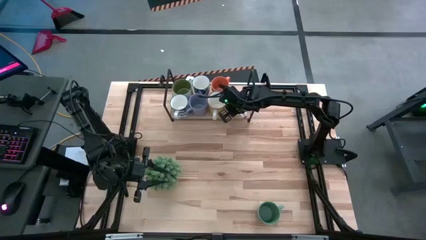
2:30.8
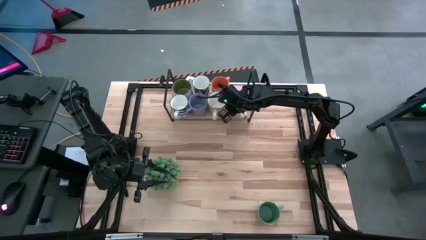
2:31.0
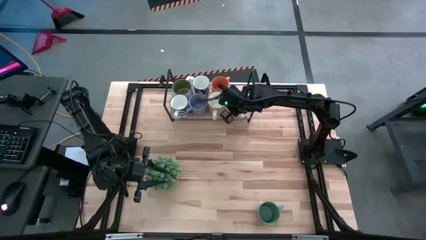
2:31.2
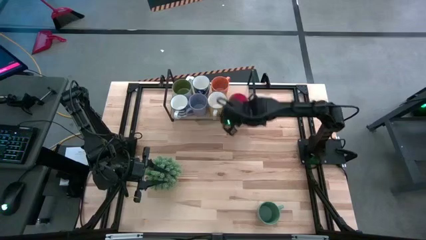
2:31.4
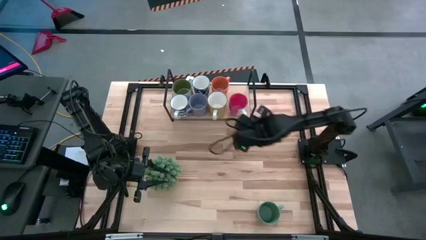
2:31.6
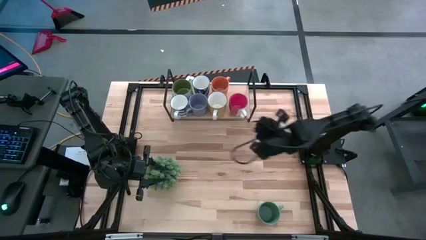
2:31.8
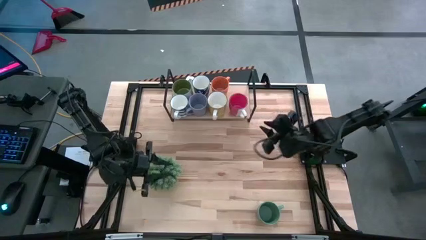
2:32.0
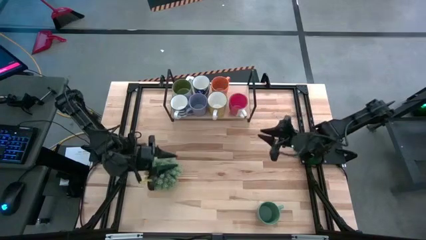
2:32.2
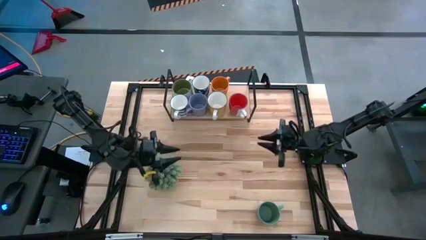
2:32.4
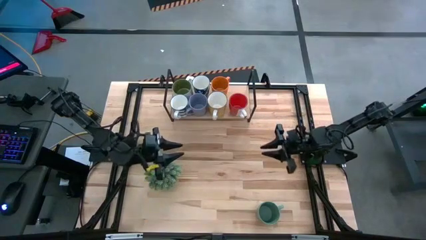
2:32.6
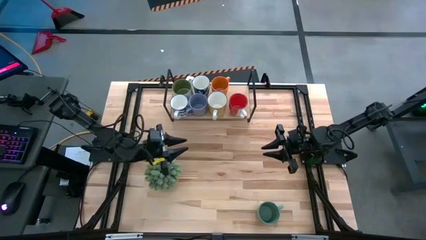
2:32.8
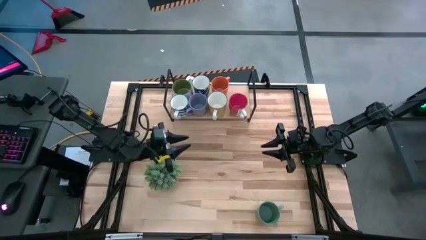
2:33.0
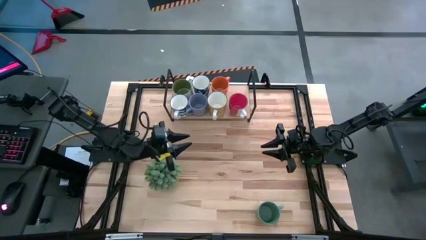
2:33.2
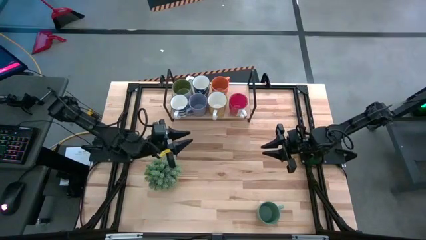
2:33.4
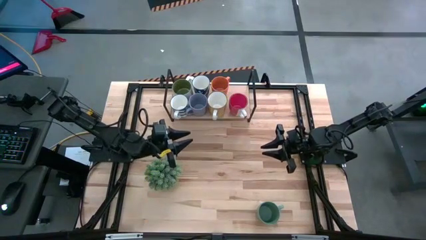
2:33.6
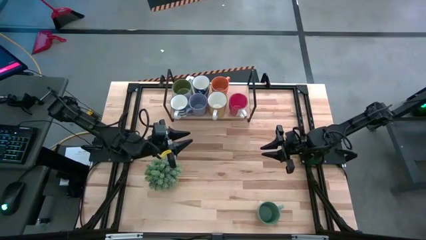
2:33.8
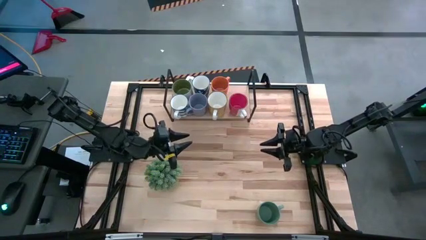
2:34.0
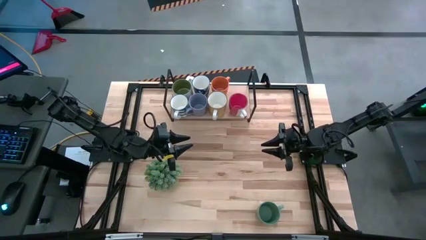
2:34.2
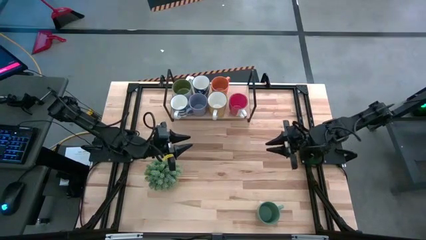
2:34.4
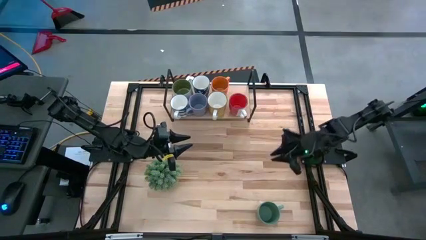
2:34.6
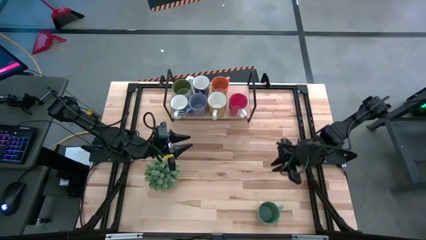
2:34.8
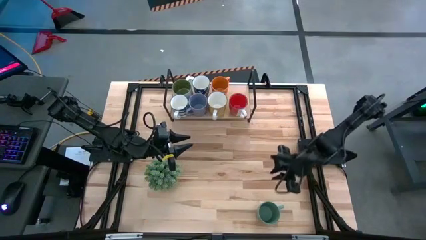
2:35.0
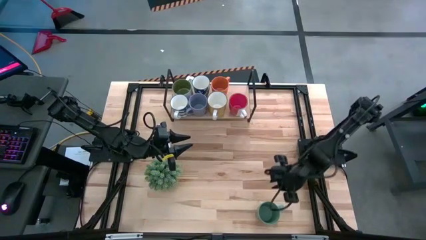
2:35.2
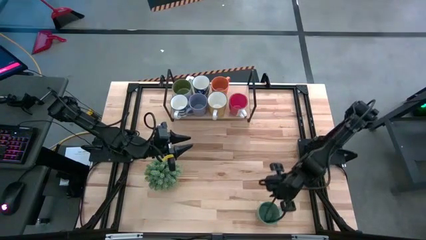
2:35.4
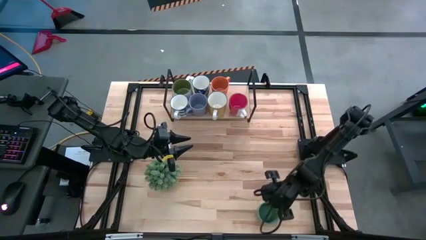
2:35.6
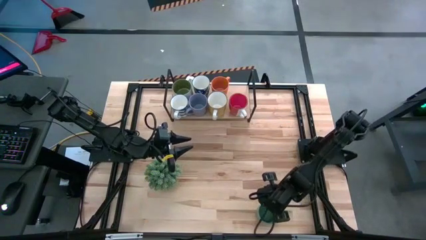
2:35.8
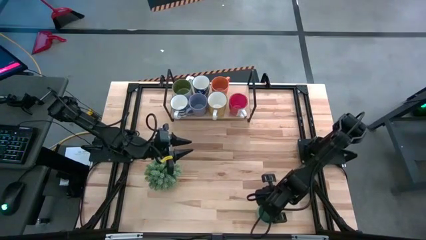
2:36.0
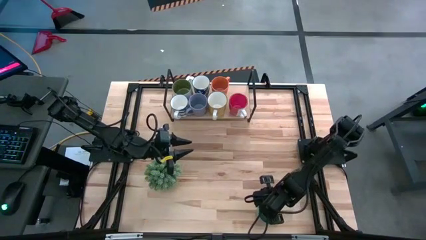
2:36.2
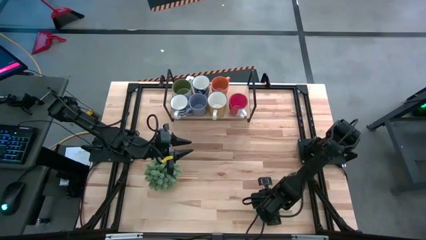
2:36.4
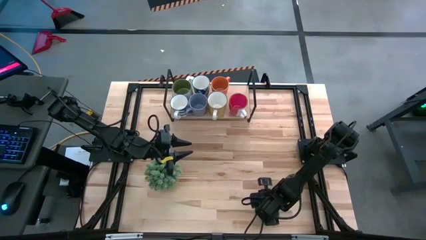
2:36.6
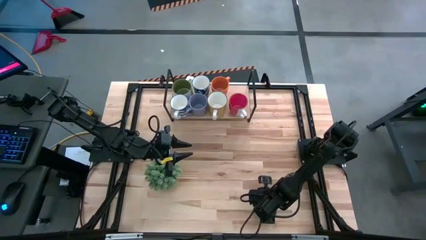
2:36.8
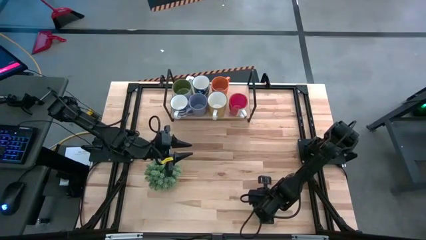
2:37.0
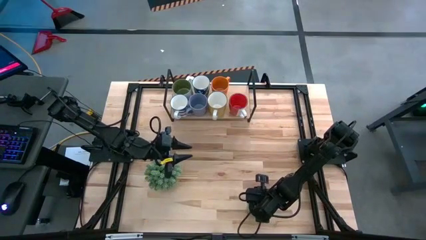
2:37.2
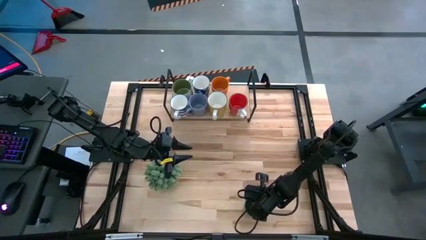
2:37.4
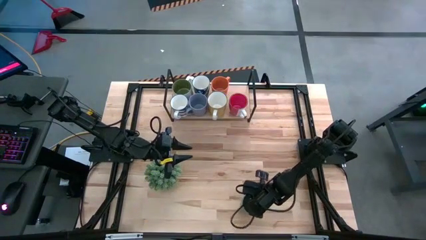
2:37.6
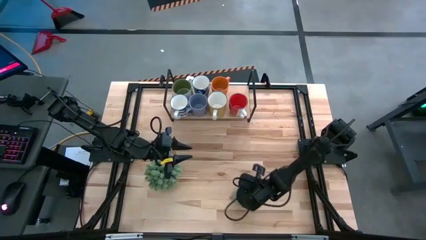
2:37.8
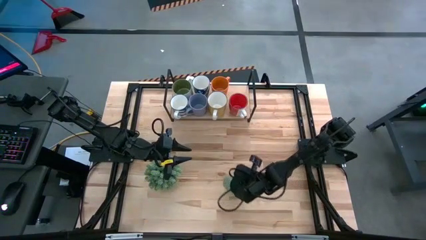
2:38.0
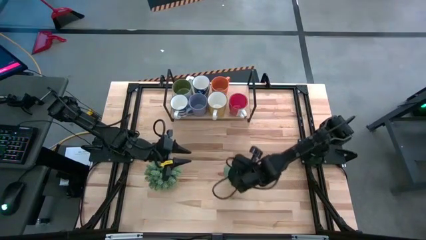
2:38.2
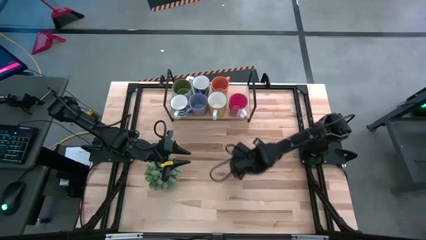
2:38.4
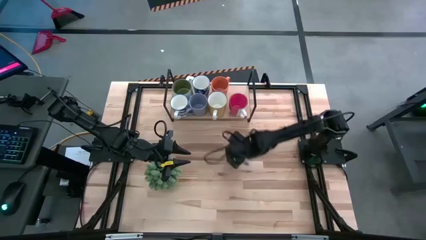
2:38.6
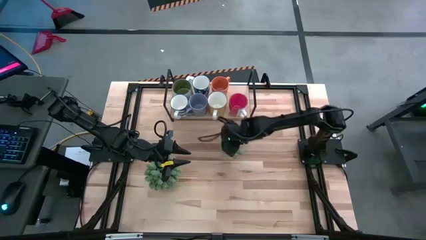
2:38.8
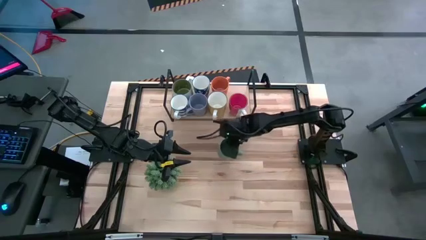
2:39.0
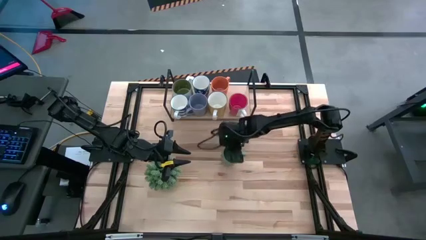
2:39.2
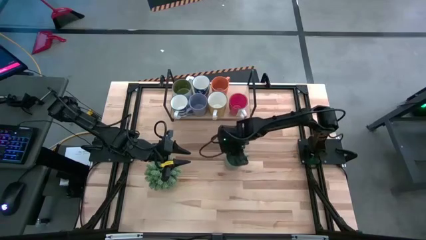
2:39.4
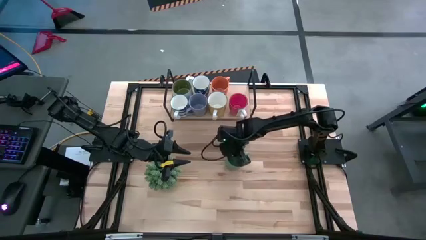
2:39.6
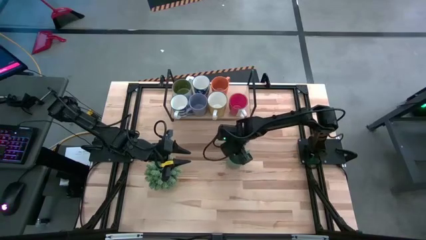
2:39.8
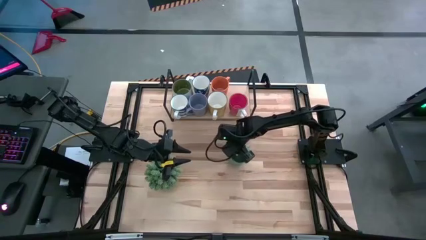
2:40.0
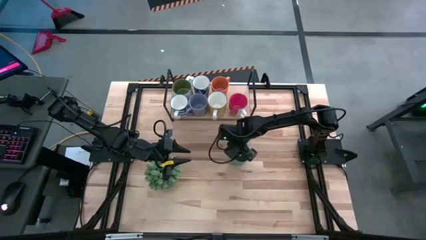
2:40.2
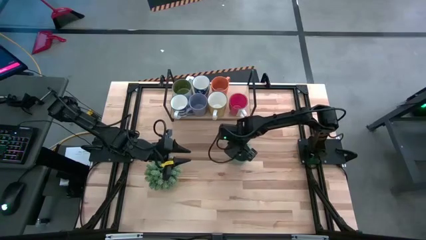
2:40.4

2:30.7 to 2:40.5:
Task: Place coffee mugs
Put the green mug on the shelf aligned with the other red mug

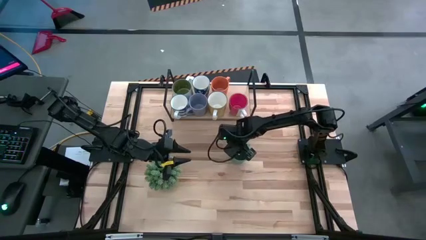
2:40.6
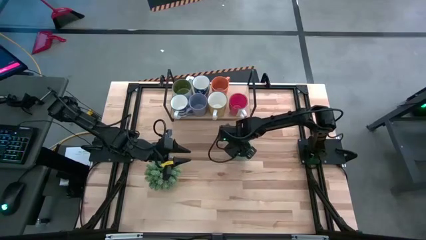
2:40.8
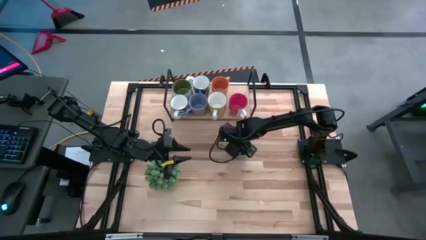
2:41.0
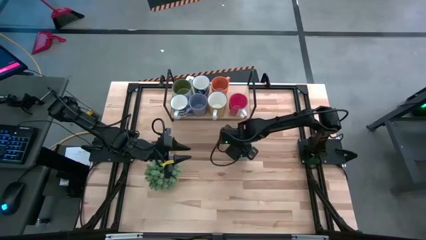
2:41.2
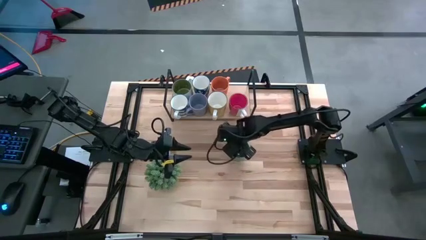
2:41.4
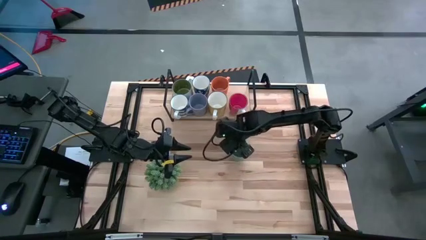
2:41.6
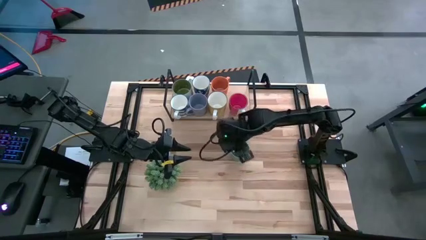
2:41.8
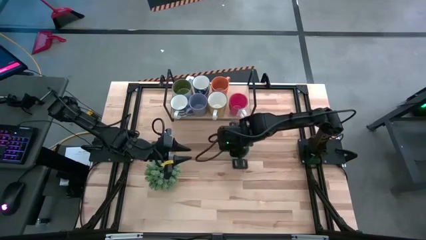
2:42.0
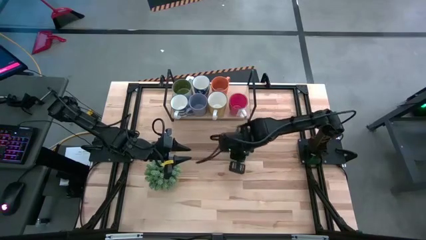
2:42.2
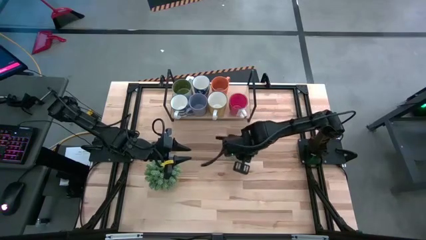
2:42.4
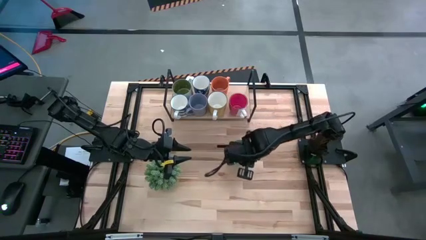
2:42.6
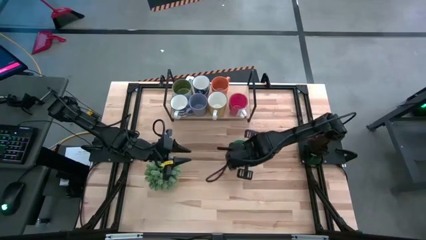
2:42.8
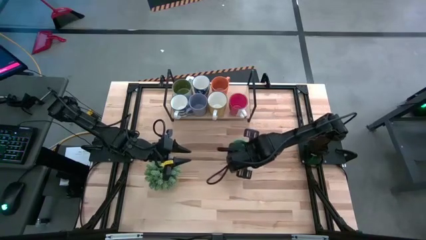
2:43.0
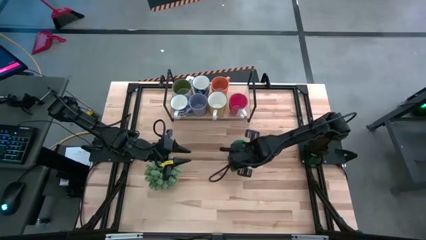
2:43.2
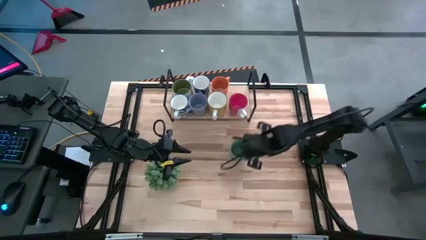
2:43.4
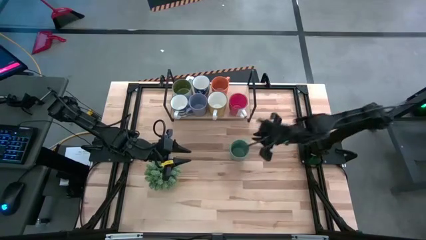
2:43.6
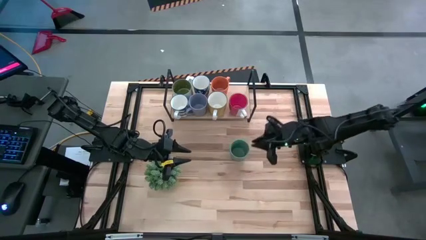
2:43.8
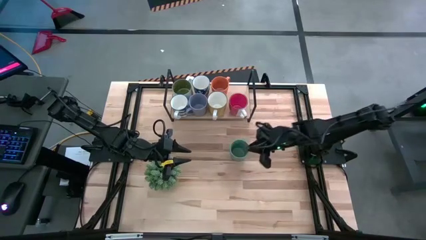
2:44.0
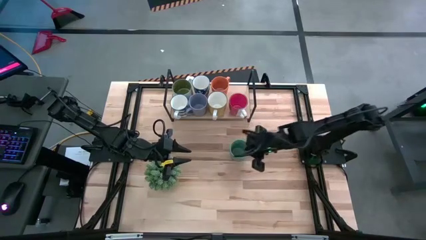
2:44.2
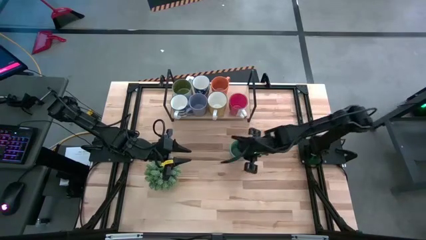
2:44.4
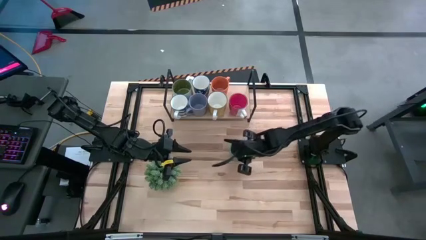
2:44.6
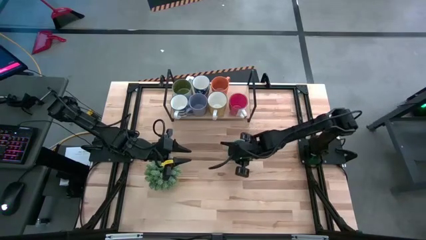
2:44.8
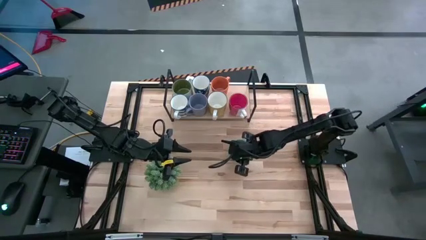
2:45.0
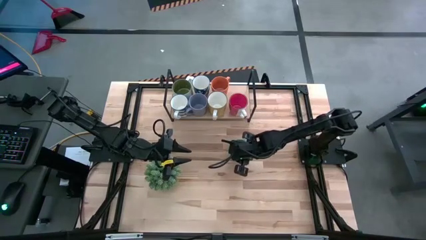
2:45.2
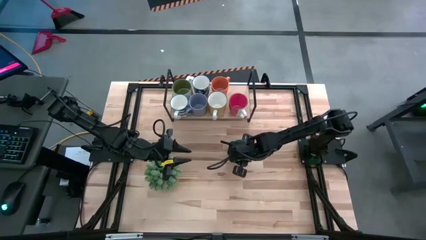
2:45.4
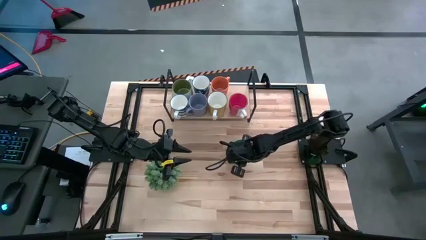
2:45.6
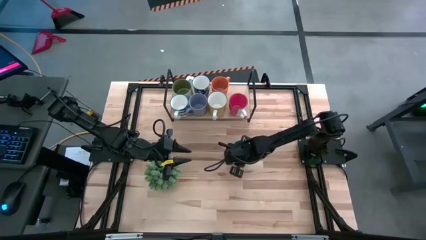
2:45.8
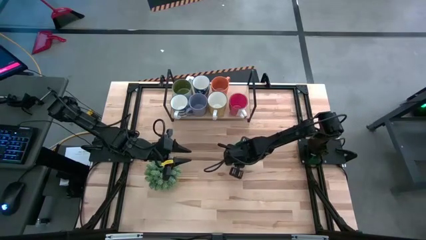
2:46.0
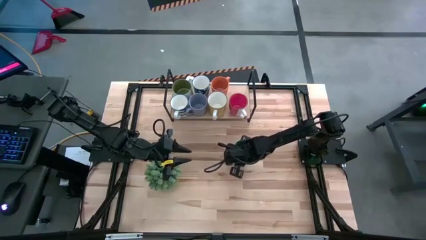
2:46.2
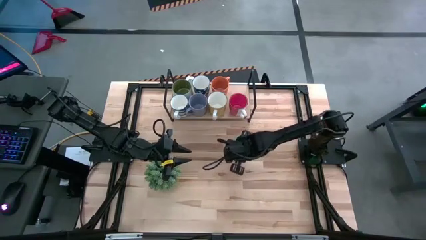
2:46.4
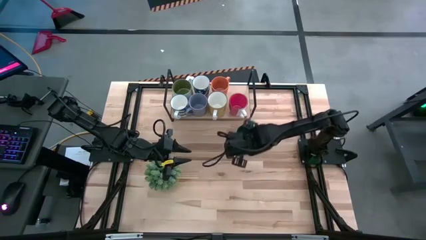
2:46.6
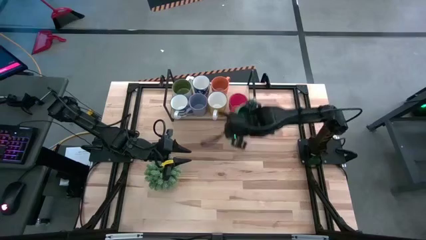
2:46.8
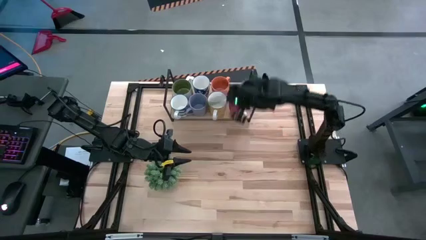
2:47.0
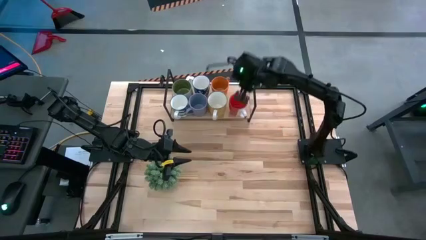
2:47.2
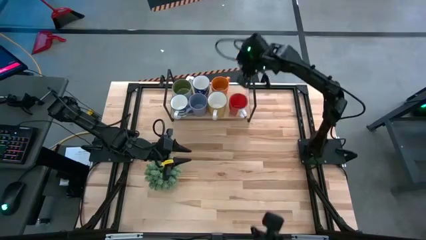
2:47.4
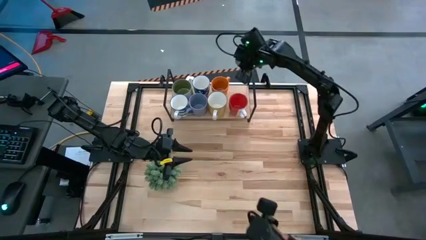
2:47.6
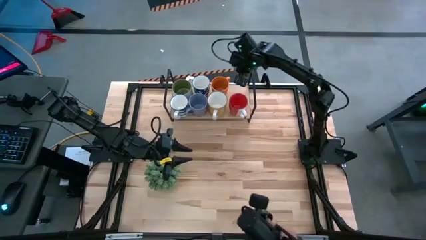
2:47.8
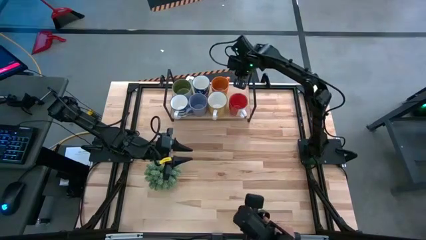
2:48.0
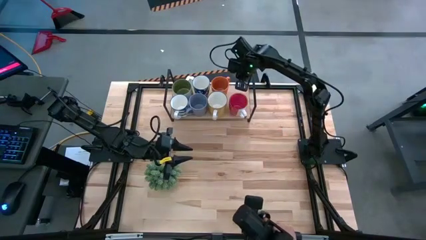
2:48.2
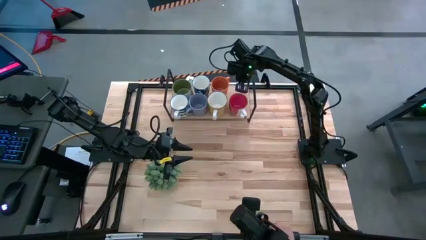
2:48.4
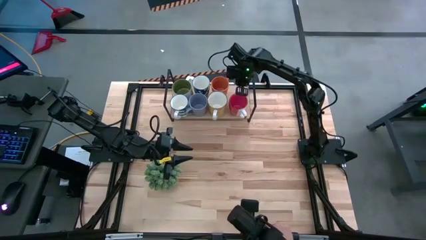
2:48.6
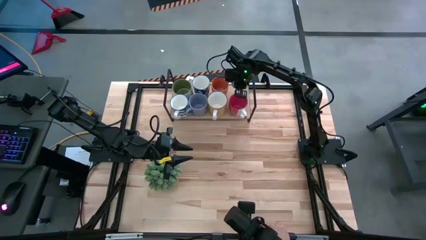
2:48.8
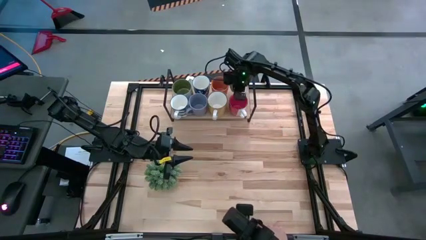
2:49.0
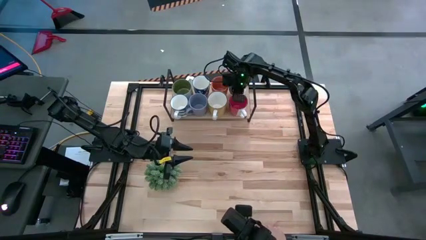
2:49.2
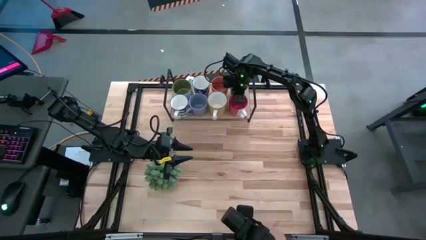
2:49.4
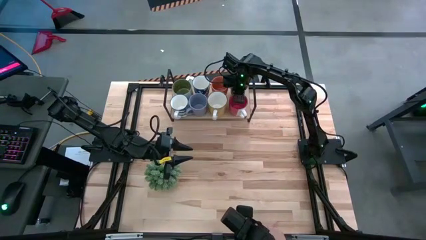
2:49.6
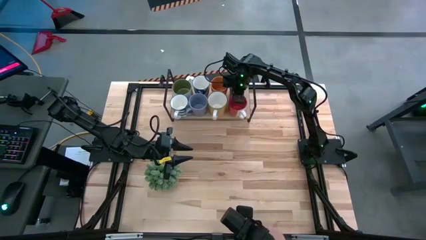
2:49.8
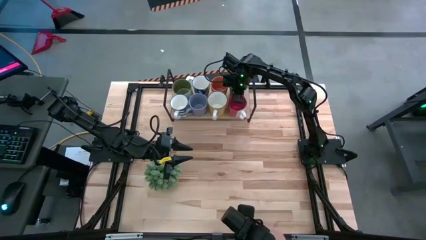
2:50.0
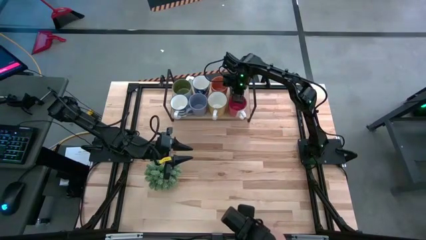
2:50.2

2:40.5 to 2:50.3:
Put the green mug on the shelf aligned with the other red mug
